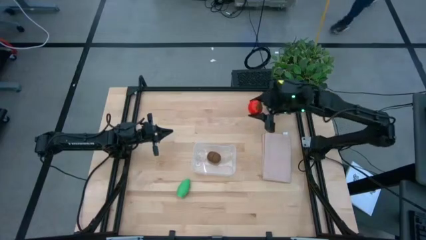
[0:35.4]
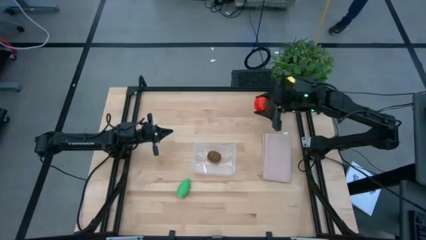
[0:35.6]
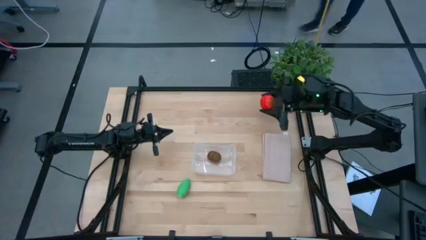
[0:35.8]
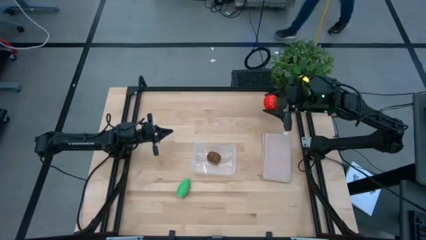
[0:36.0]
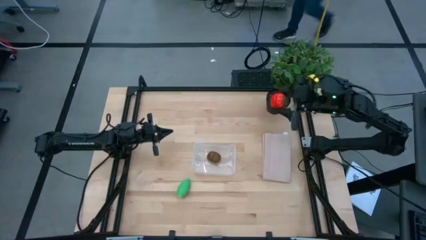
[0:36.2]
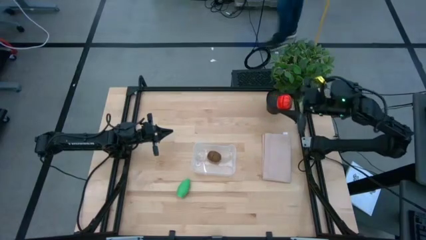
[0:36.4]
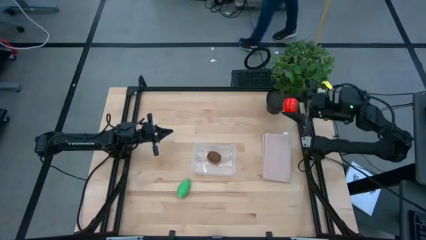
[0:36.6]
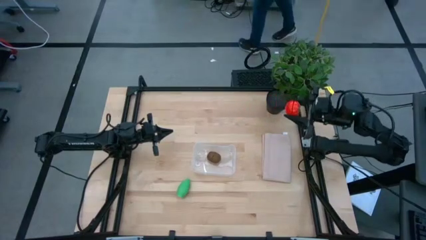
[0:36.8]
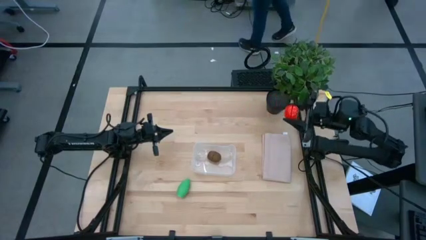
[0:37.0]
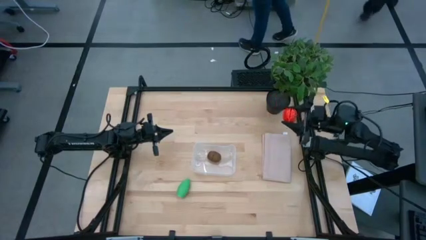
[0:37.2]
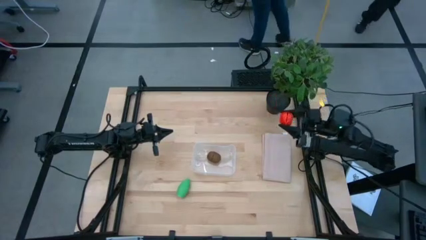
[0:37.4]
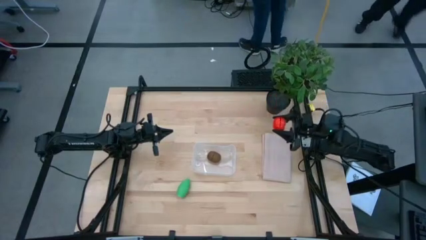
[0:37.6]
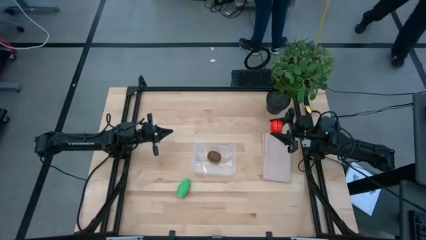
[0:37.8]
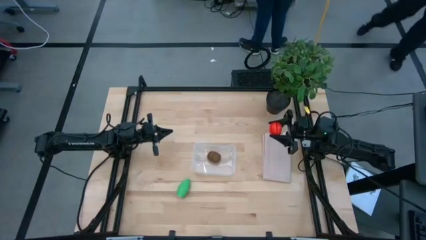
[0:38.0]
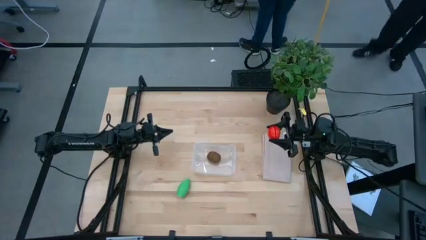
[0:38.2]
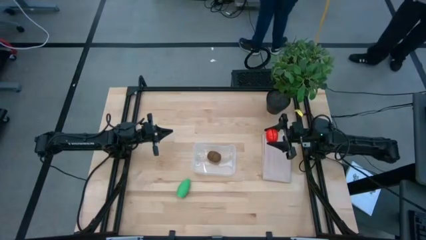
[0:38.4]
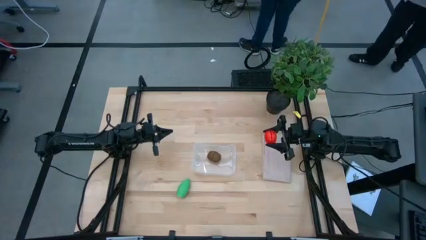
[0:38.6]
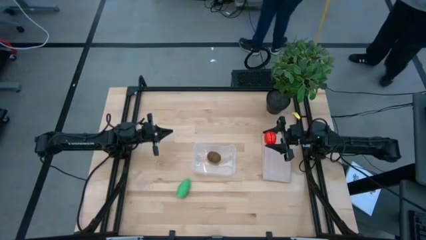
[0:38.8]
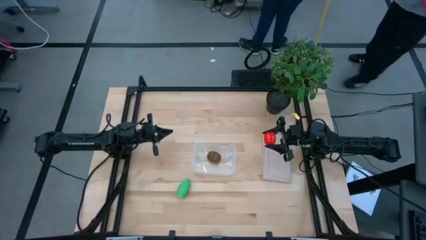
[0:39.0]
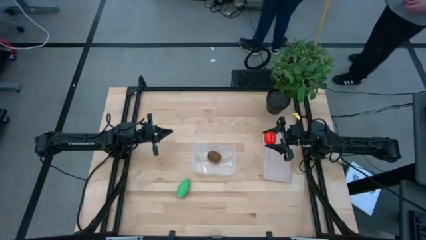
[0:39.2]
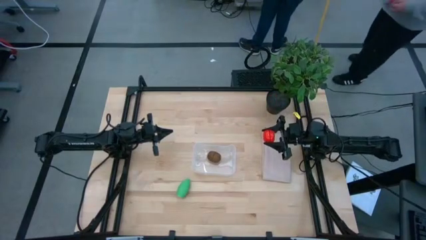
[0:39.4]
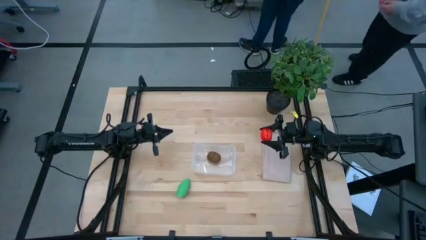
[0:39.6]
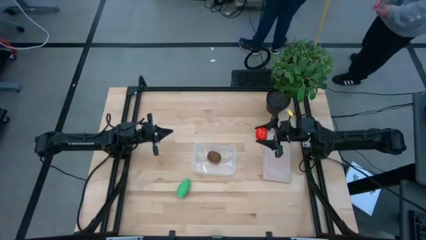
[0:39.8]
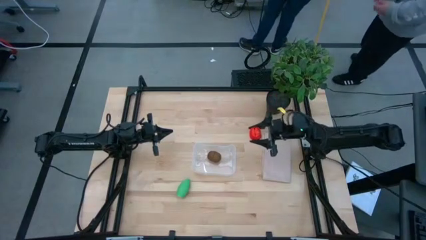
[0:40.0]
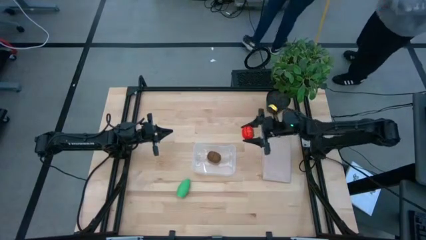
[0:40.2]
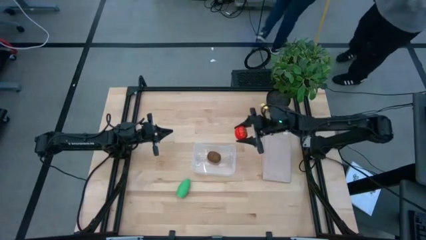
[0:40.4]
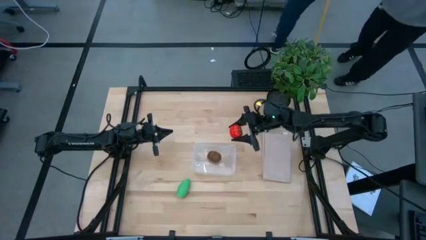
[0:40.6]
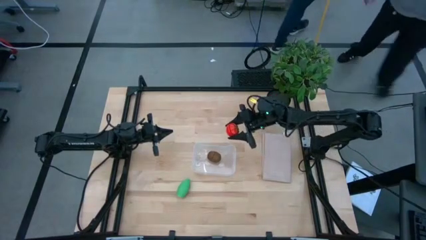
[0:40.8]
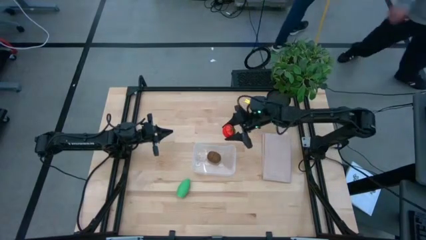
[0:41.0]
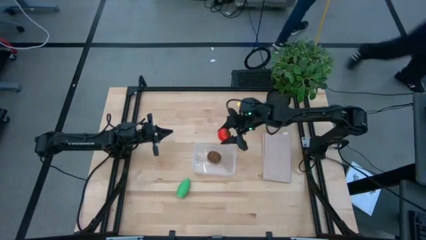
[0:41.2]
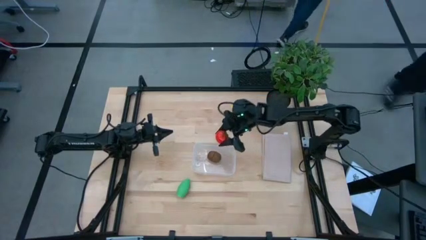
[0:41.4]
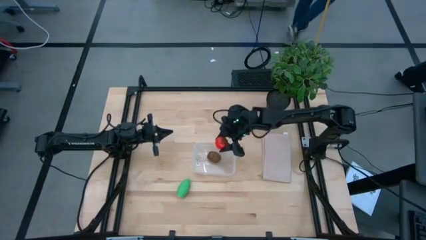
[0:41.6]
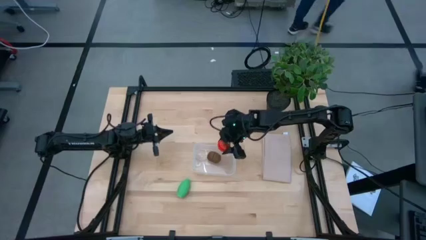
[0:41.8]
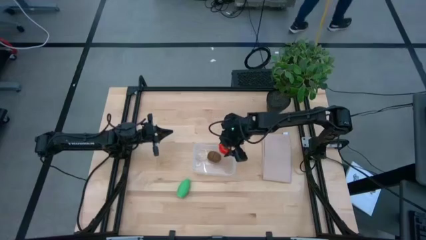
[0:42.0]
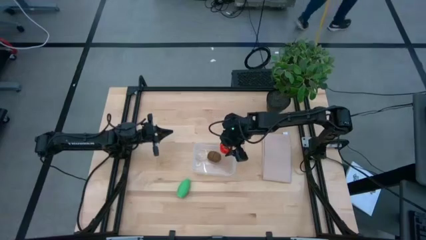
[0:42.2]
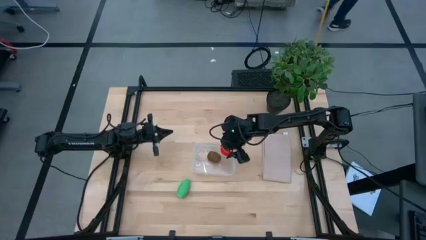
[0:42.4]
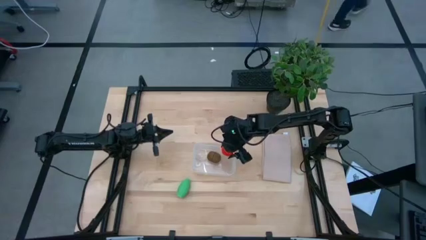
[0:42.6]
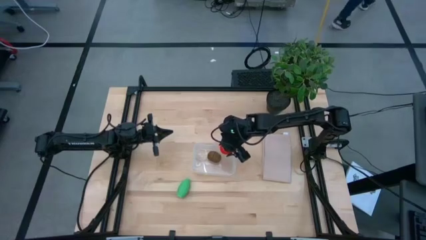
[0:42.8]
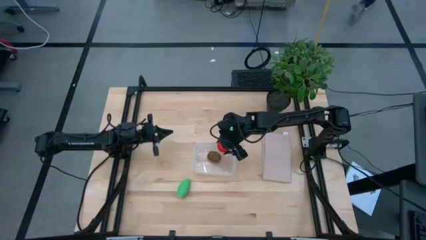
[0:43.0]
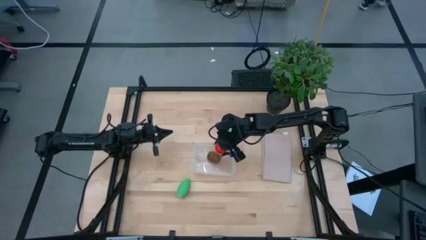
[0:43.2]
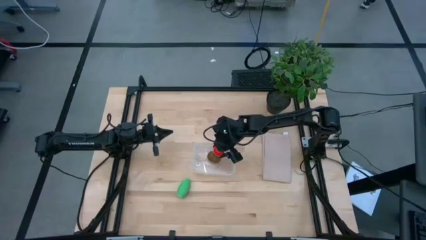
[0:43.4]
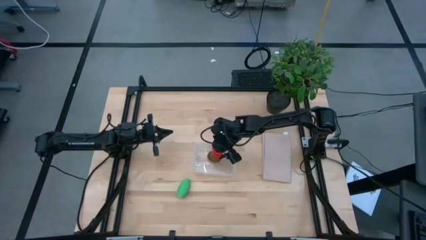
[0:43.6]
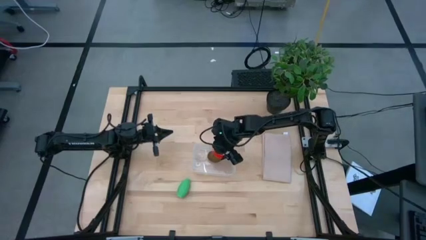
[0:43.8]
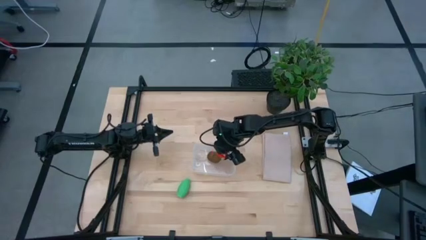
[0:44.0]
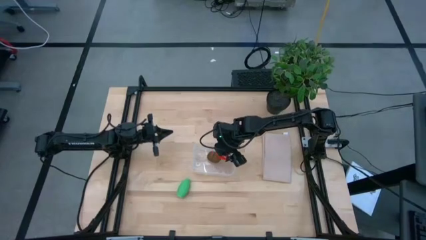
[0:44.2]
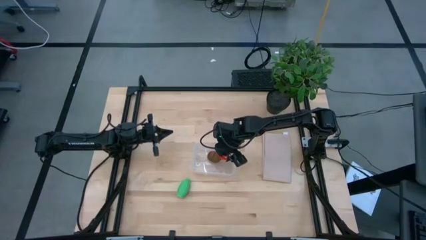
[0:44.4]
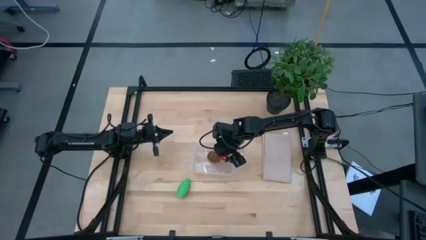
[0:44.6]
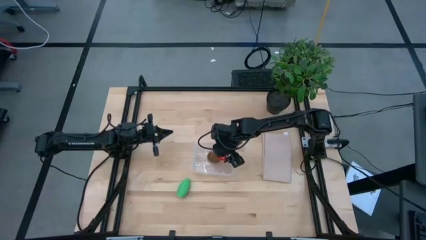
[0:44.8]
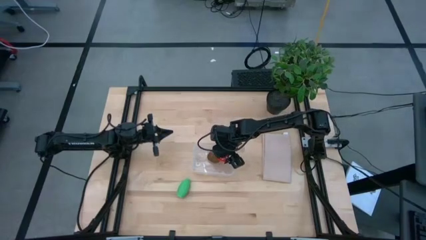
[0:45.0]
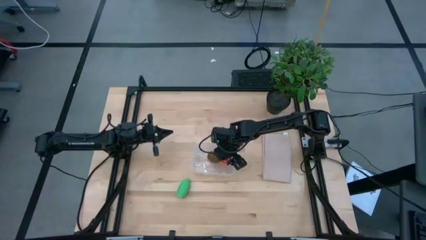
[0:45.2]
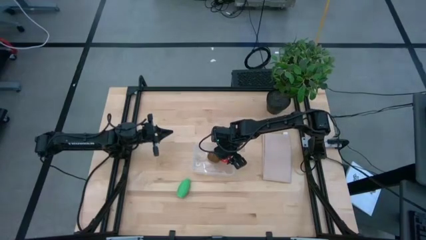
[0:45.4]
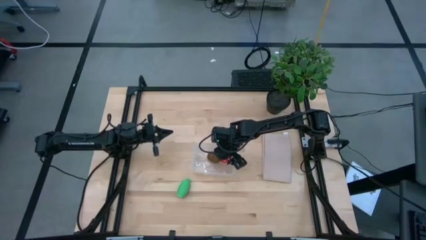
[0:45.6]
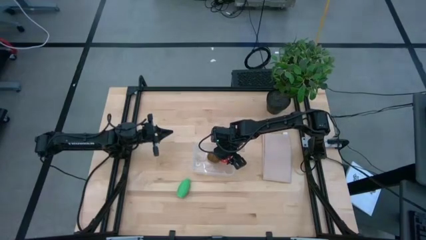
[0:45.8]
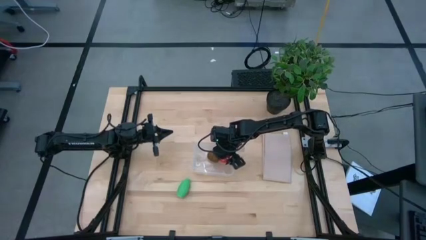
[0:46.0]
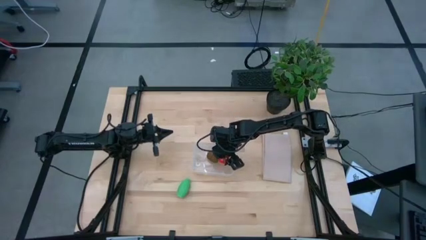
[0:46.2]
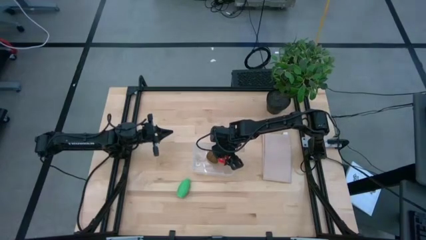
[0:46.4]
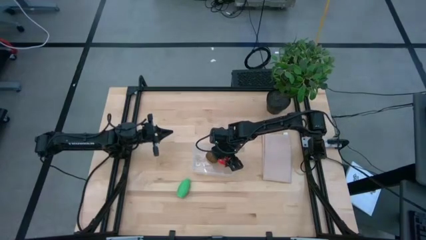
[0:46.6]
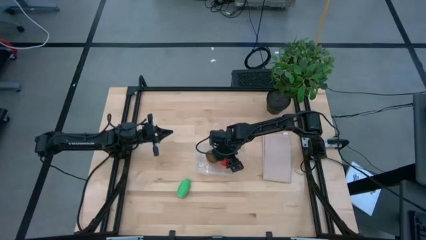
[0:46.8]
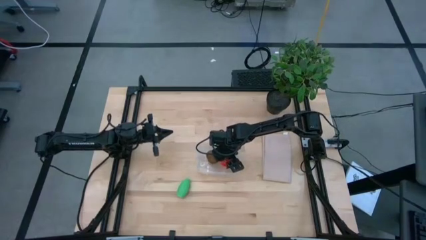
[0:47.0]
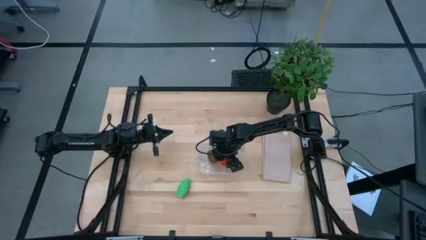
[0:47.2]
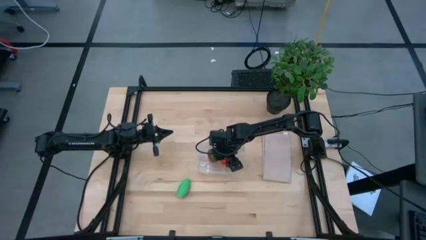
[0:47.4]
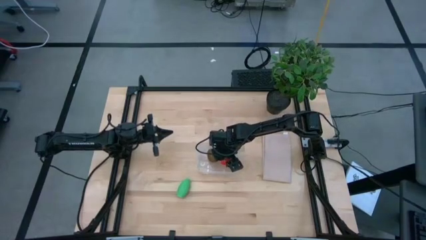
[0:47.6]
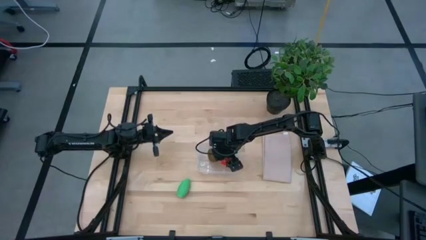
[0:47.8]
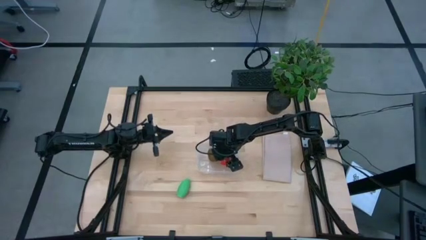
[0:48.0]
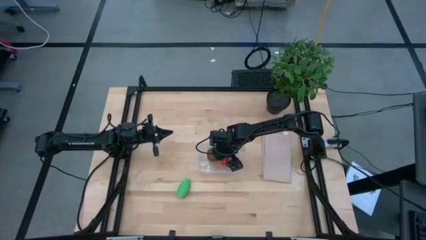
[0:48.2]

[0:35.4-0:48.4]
Task: Pick and placing Produce into tupperware
Put the tomato into the transparent bin

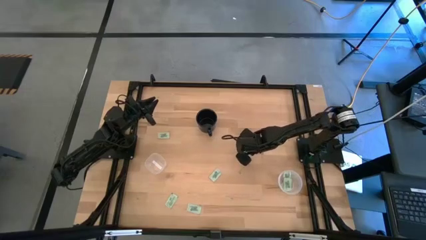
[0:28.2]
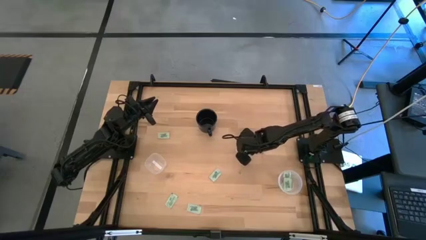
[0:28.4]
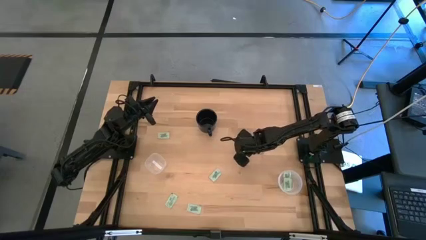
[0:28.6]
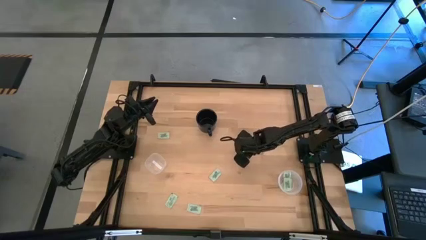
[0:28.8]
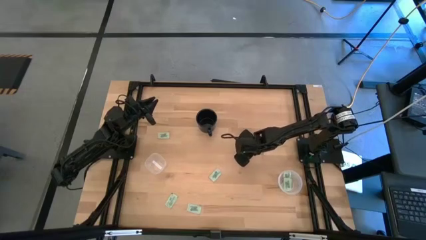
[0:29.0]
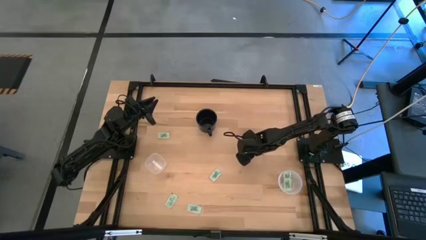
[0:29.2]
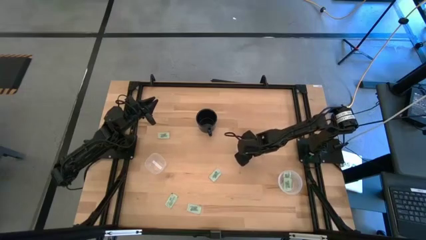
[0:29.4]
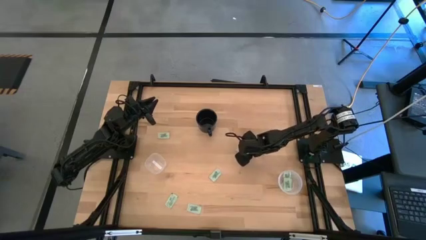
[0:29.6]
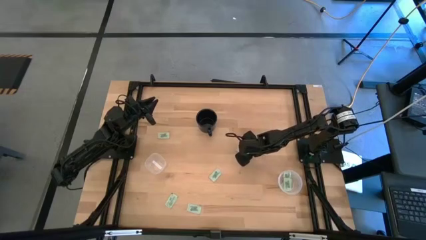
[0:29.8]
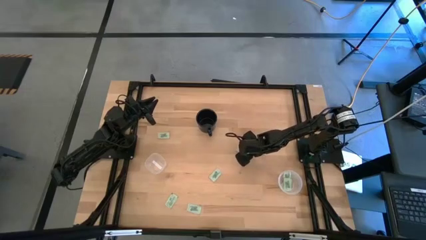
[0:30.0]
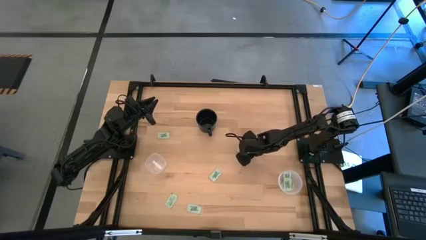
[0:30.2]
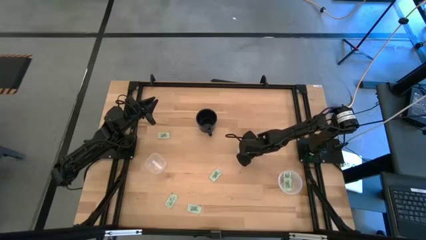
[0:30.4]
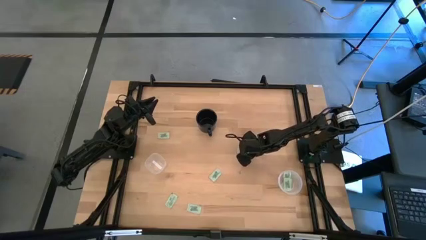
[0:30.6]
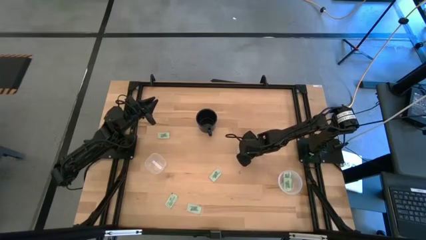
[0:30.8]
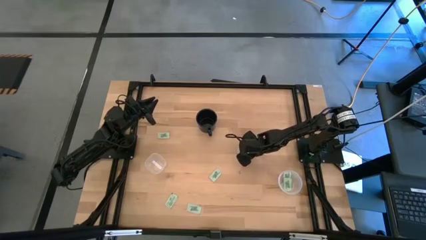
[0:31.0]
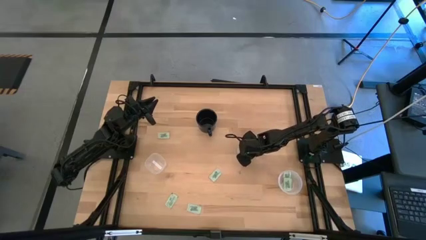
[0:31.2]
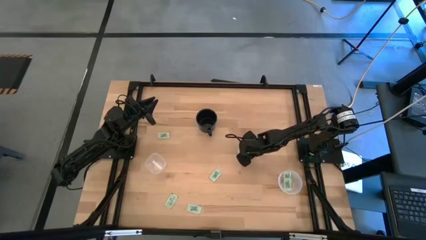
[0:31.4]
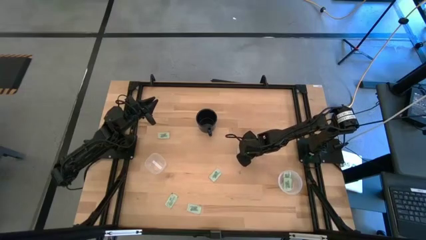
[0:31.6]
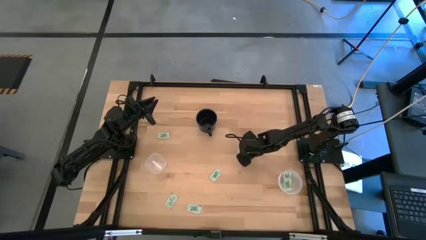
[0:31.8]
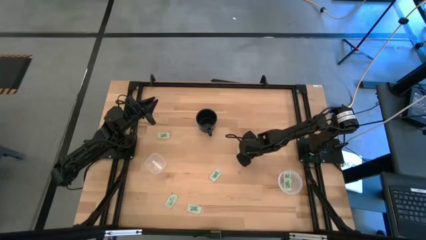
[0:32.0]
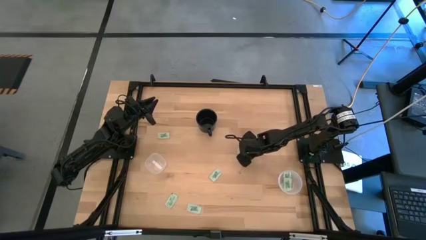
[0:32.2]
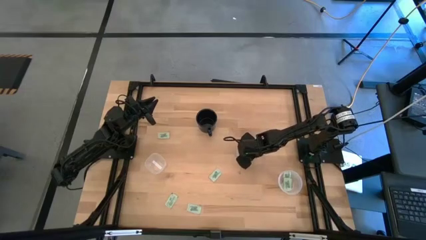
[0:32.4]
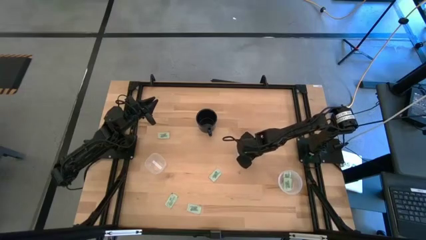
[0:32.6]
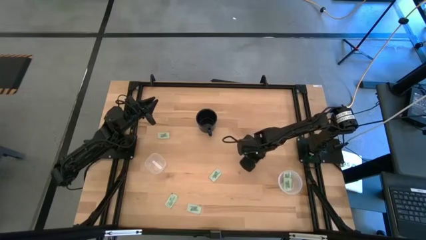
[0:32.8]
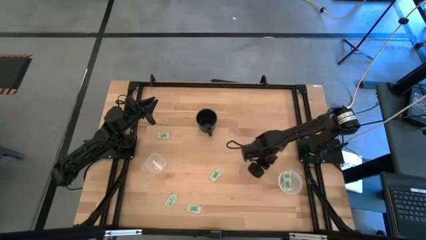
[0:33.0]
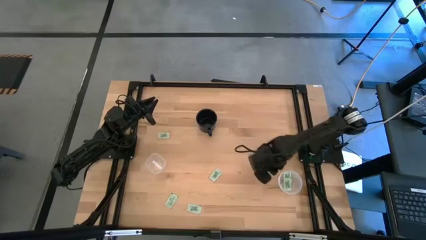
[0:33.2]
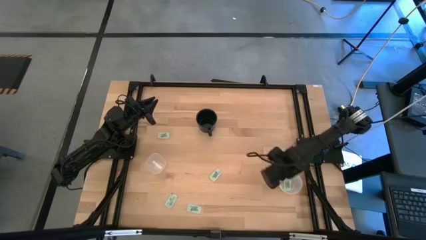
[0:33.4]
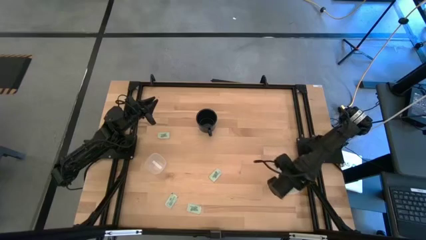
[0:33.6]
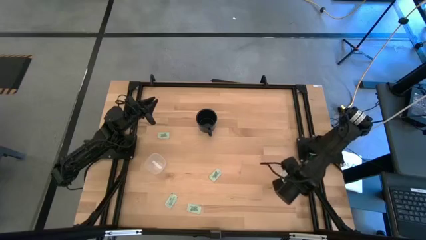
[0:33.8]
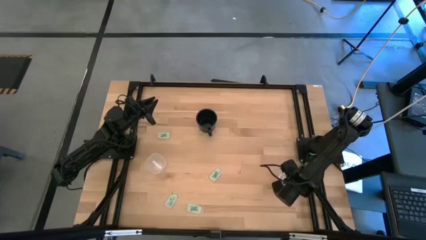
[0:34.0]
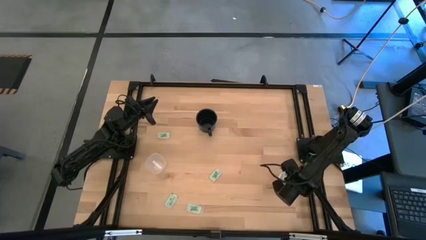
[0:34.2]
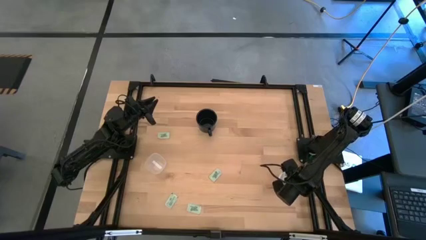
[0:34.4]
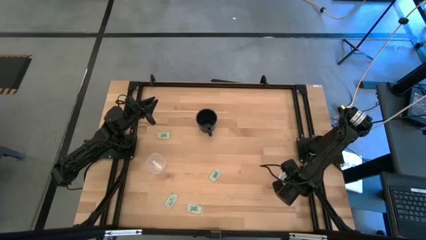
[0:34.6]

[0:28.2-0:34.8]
Task: Pick and place Stevia / Truvia into bins
Put the stevia packet into the right transparent container
